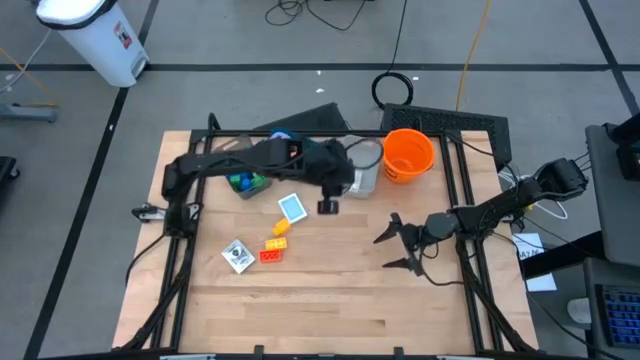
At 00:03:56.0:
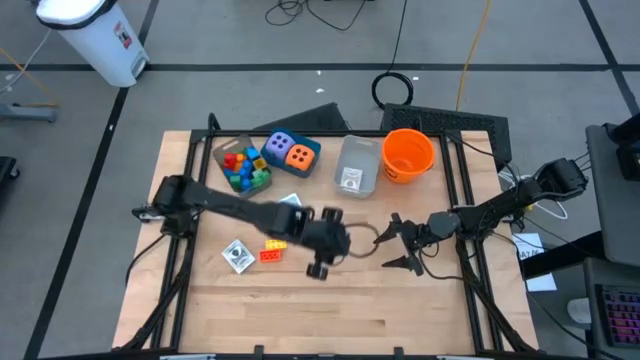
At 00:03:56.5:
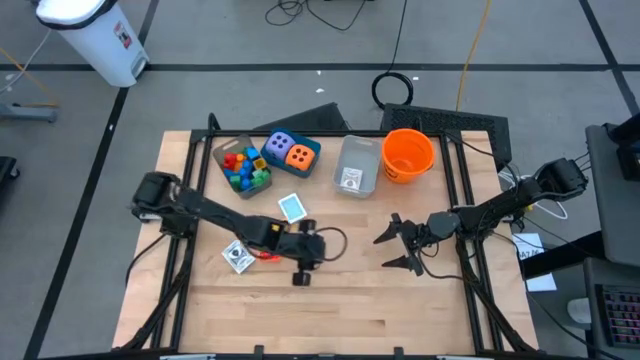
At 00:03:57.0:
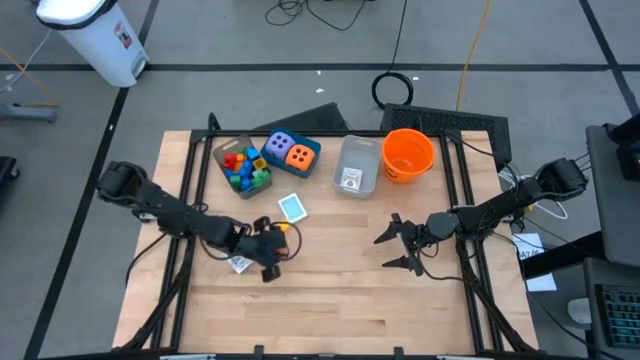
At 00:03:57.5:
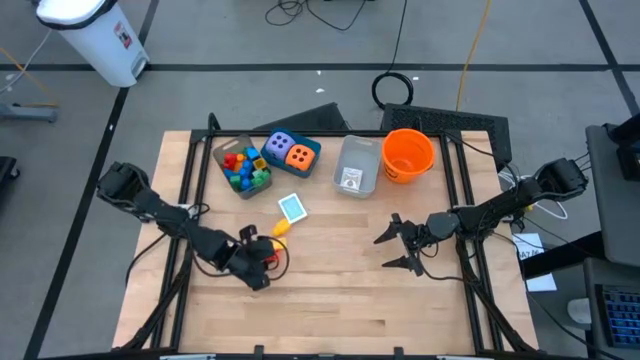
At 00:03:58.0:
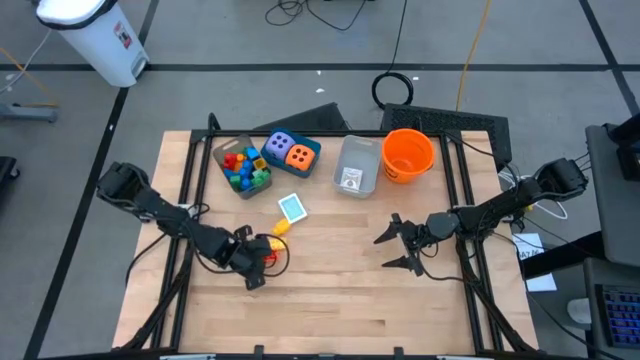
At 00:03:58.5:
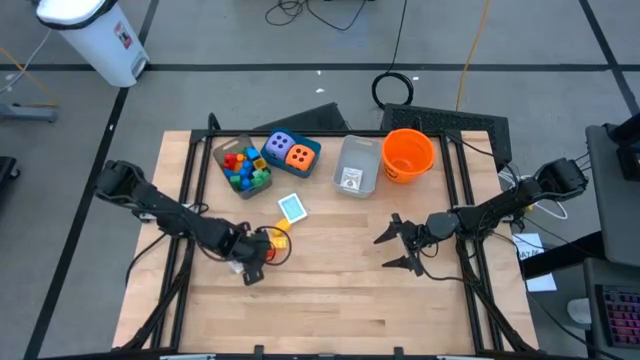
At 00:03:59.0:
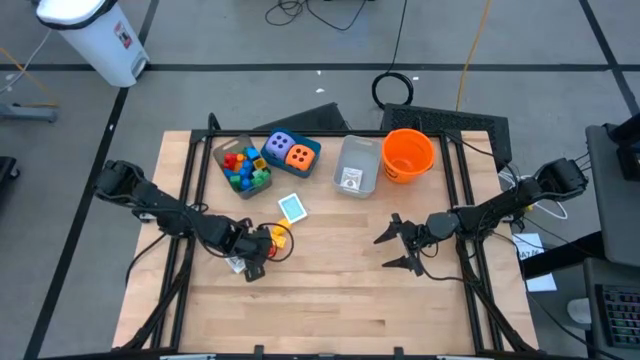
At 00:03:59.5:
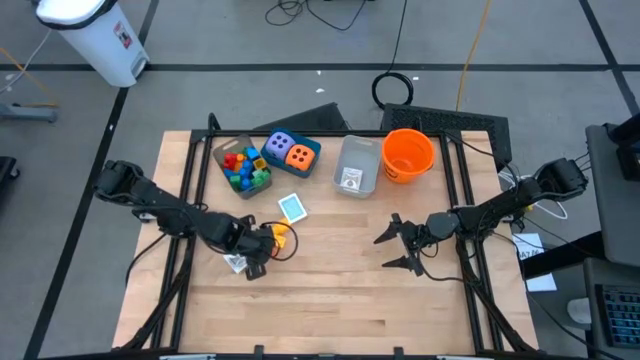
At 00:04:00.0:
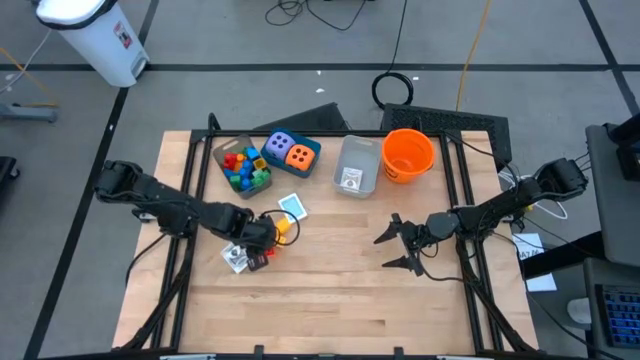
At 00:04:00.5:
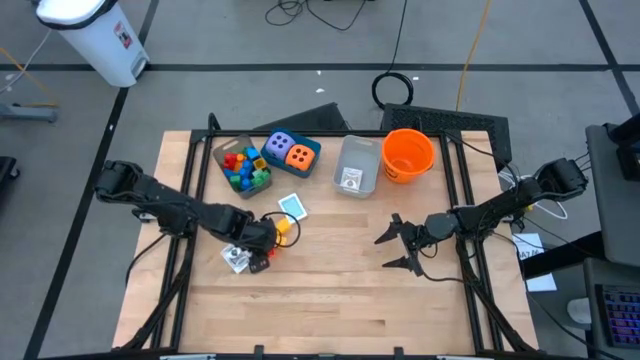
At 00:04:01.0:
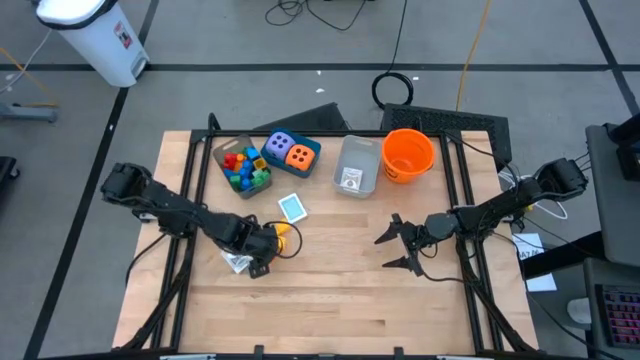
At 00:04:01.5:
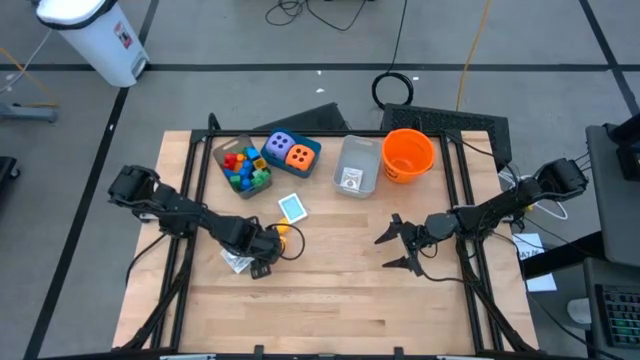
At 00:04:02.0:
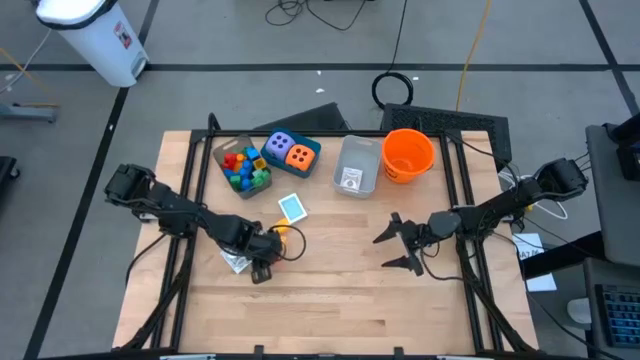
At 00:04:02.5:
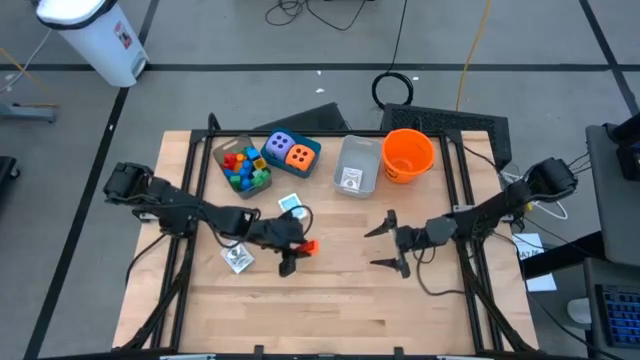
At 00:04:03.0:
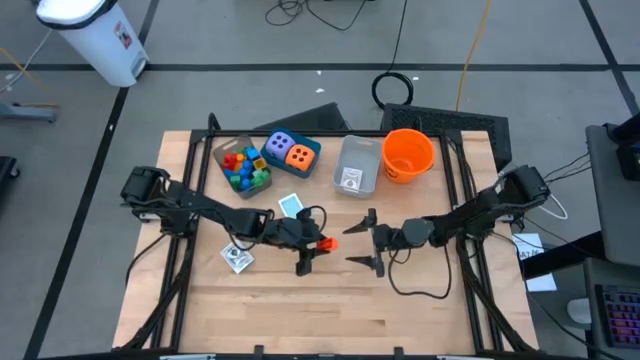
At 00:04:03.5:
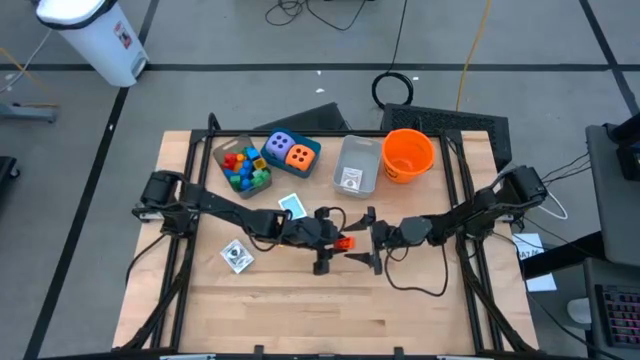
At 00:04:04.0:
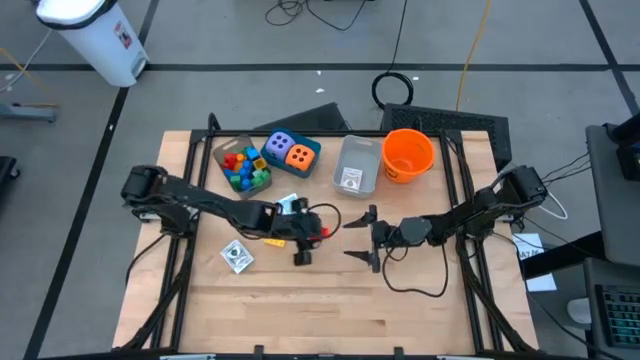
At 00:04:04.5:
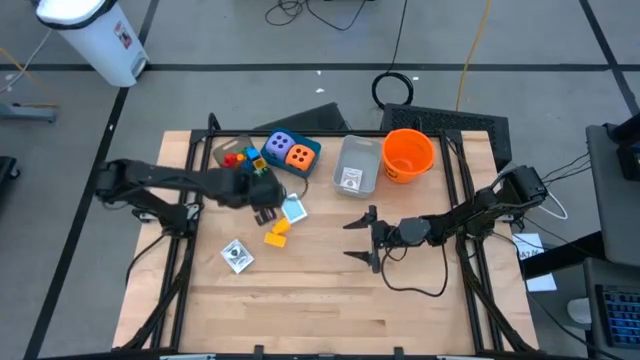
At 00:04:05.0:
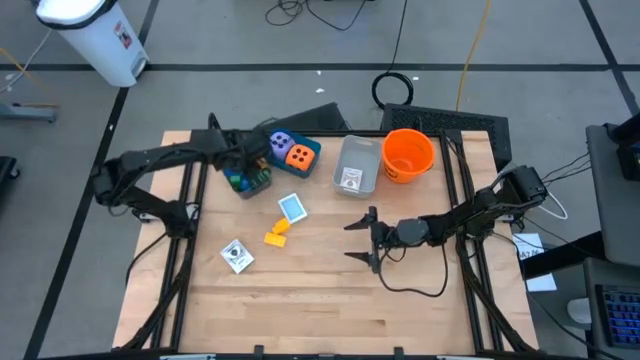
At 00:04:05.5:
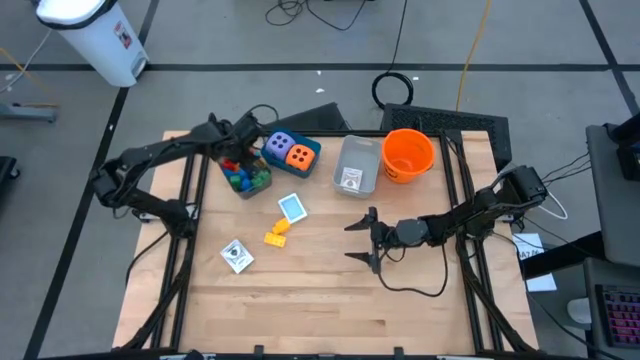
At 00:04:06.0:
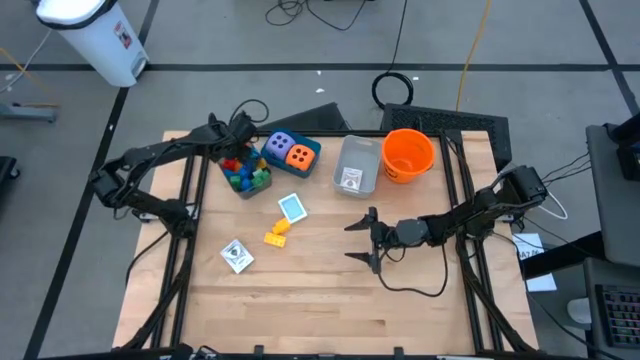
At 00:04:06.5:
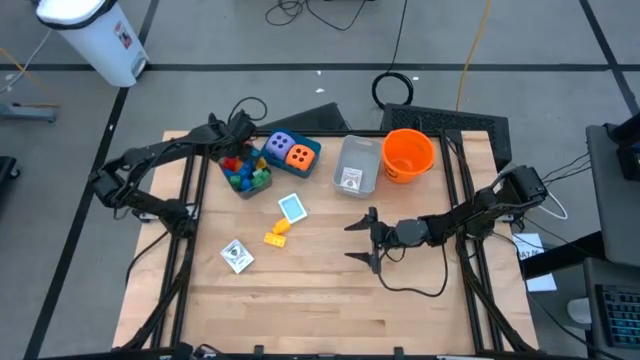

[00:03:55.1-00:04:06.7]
Task: Pick & Place Toys
Put the orange game piece into the black bin

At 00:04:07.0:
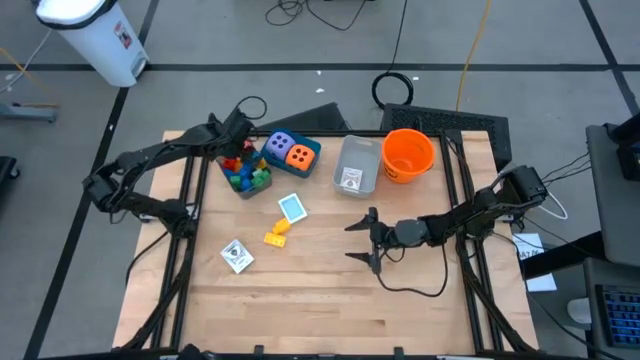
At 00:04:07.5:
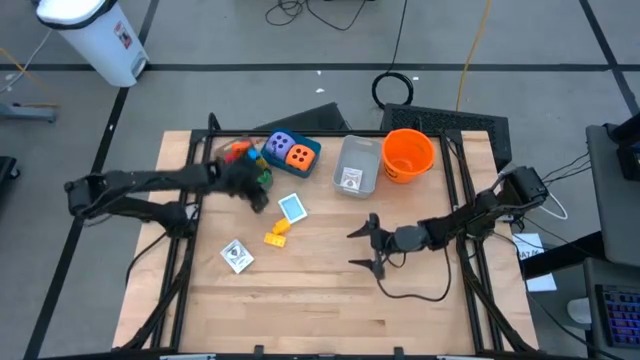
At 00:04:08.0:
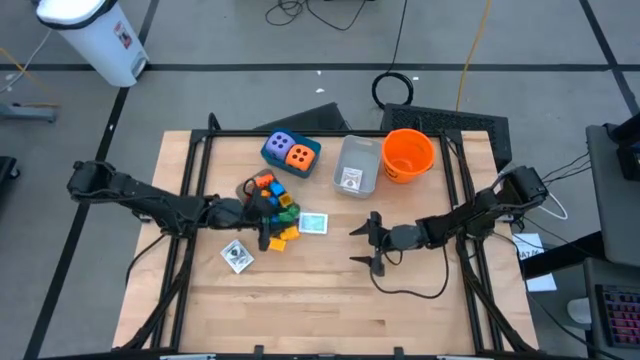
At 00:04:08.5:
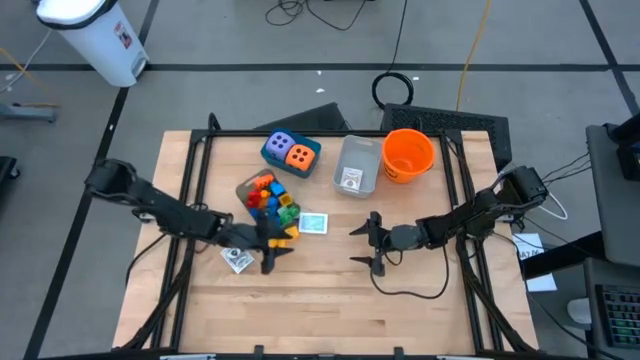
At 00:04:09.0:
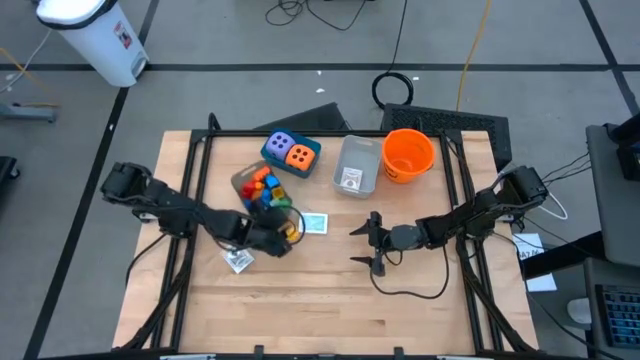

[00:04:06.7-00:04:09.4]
Adjust the black bin

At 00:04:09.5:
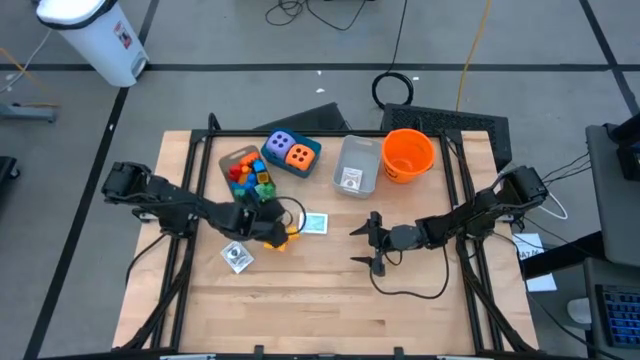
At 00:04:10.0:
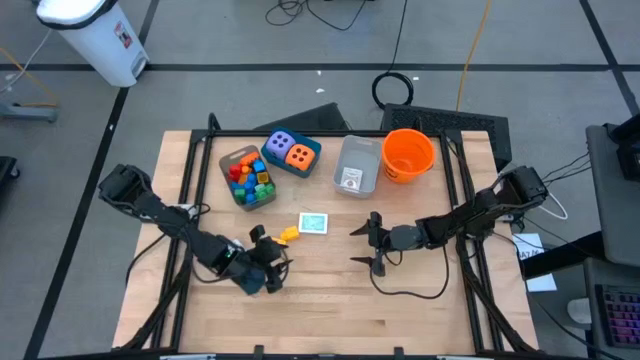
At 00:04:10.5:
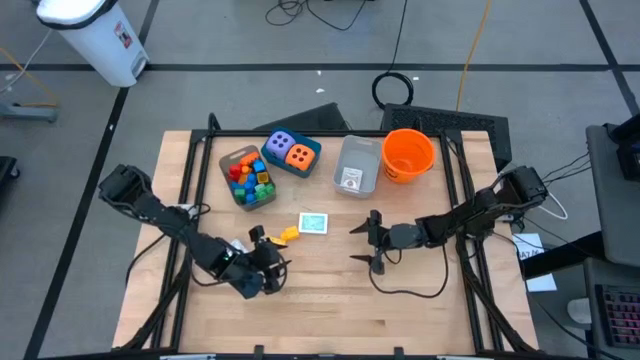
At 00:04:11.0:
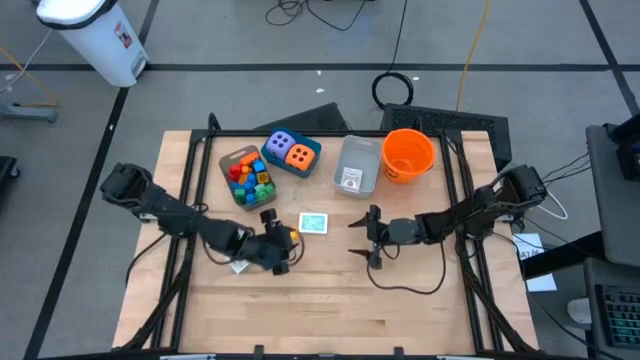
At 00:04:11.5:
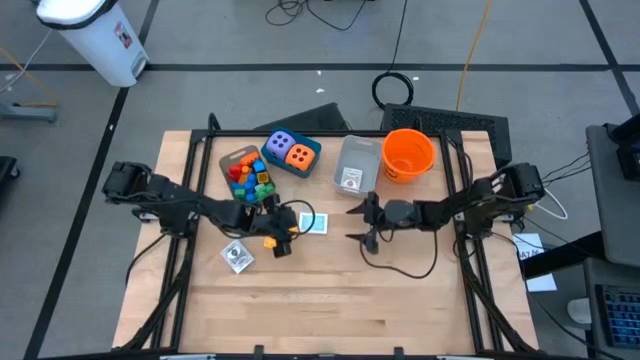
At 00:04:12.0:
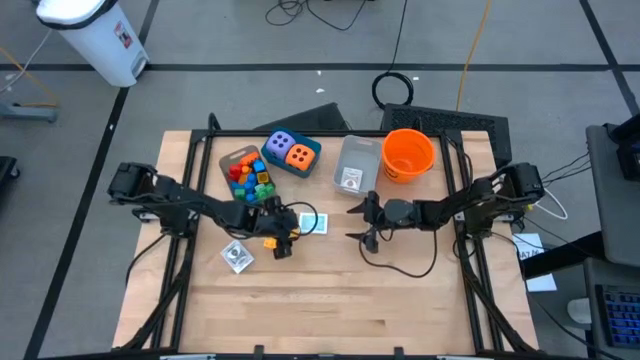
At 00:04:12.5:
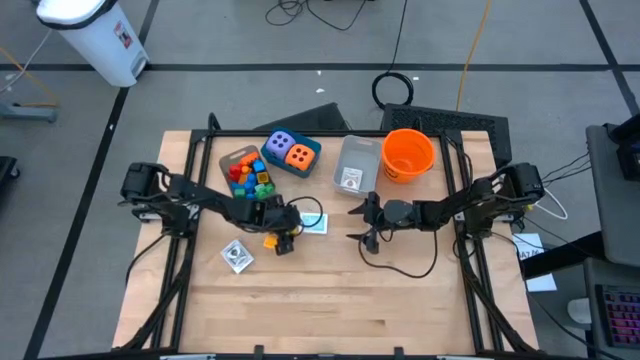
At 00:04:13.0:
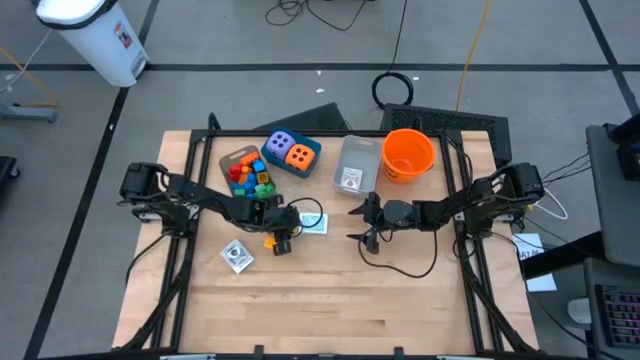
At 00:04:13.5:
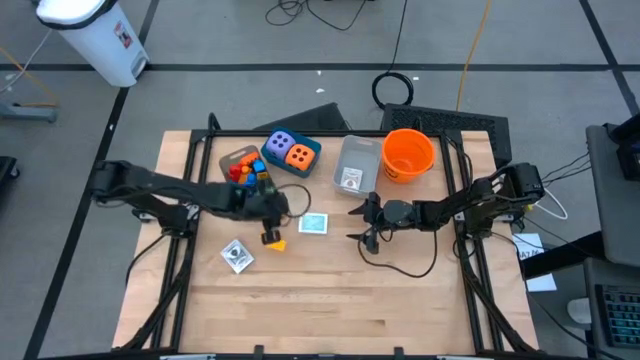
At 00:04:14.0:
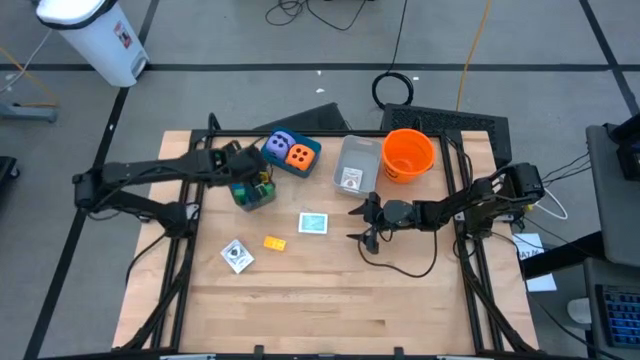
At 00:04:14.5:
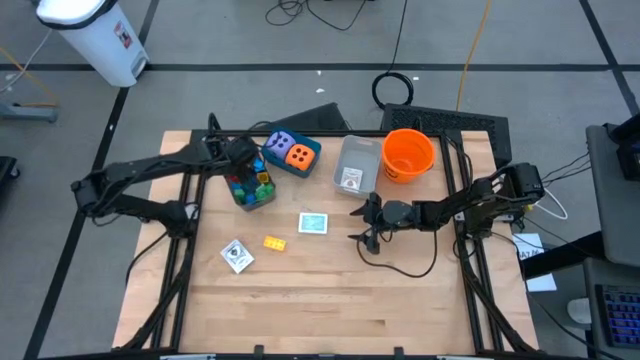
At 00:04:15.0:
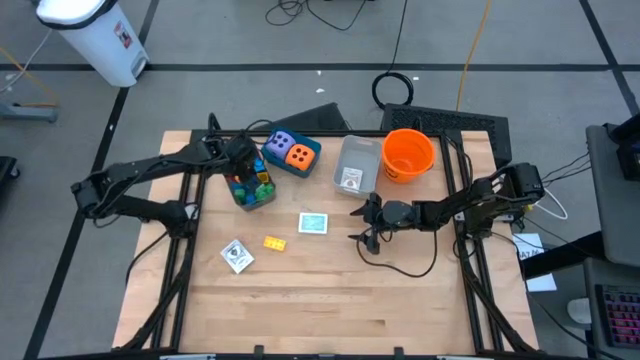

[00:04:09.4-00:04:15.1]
Put the yellow game piece into the black bin
